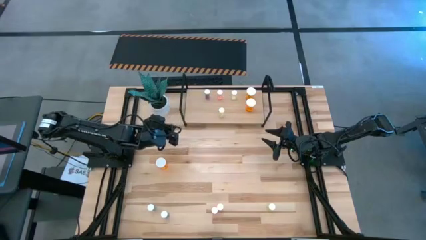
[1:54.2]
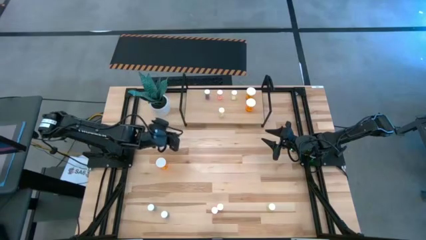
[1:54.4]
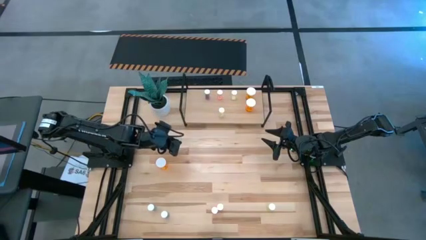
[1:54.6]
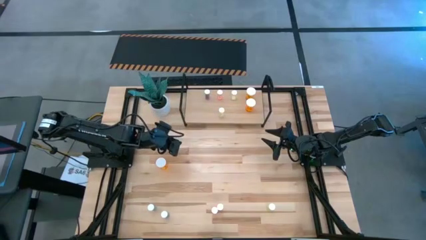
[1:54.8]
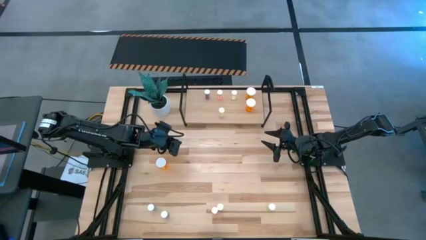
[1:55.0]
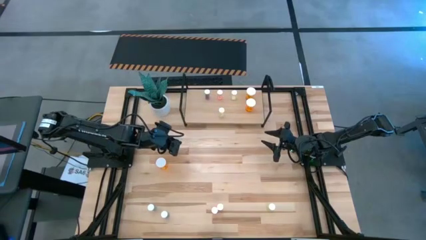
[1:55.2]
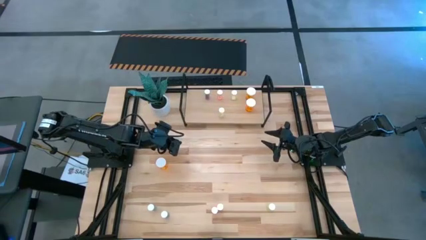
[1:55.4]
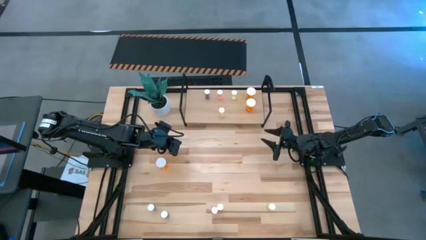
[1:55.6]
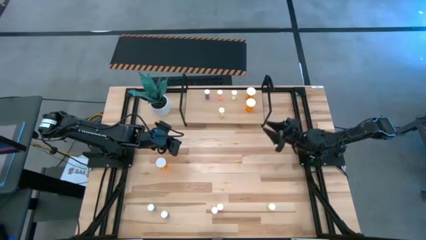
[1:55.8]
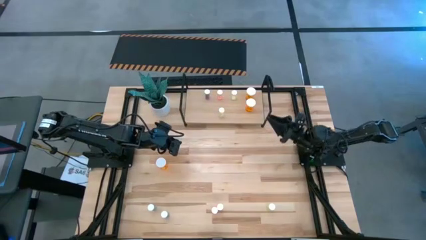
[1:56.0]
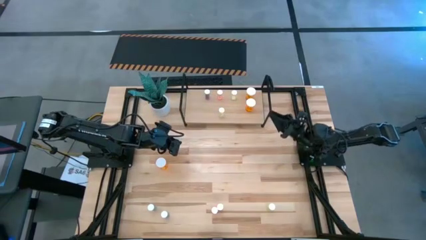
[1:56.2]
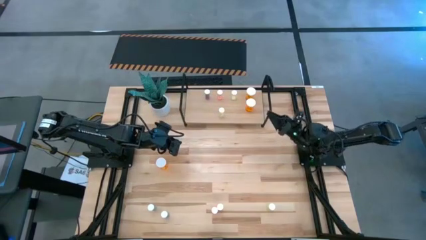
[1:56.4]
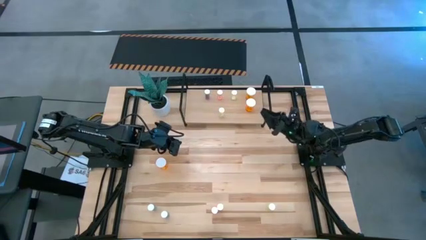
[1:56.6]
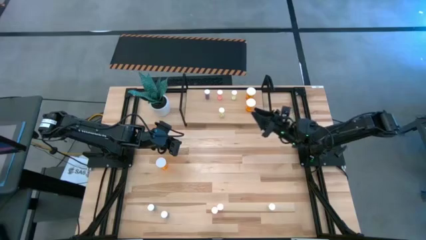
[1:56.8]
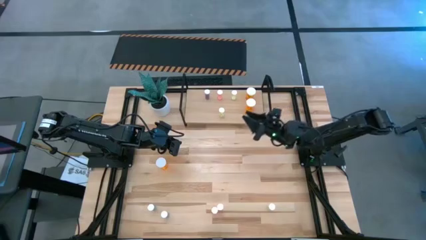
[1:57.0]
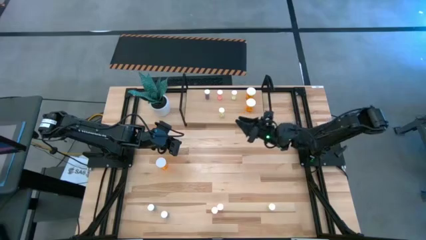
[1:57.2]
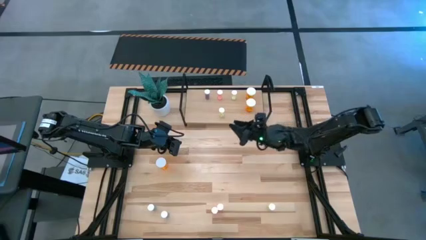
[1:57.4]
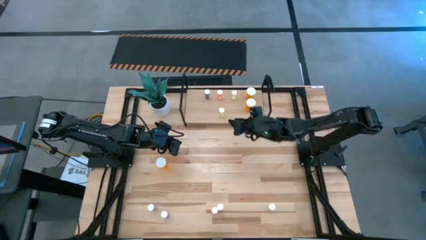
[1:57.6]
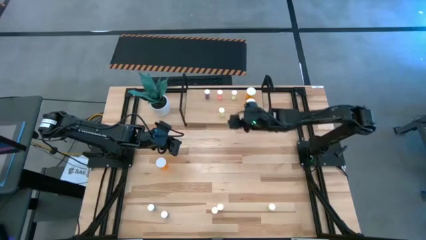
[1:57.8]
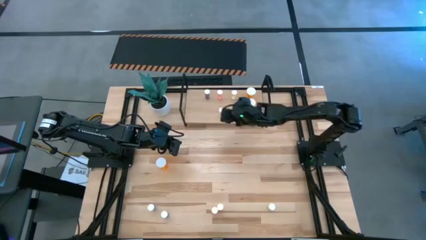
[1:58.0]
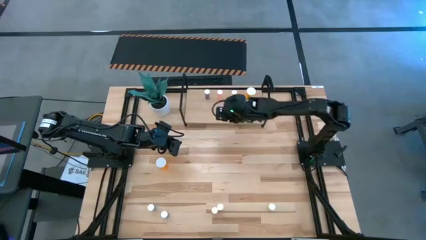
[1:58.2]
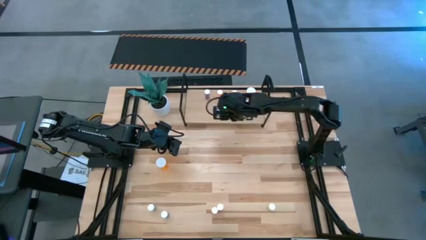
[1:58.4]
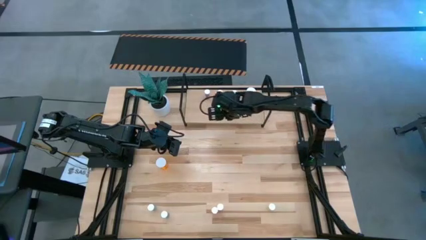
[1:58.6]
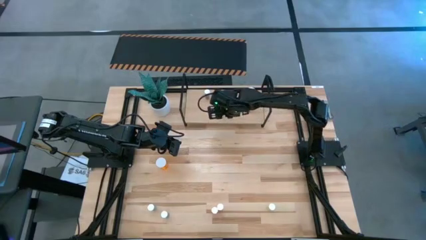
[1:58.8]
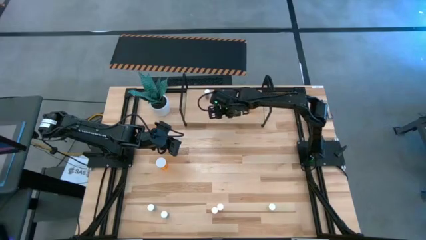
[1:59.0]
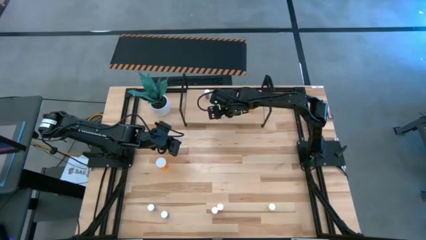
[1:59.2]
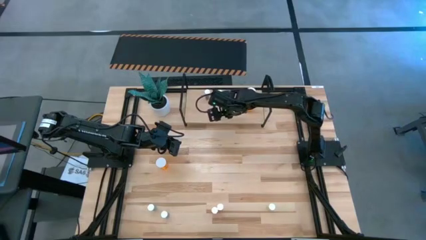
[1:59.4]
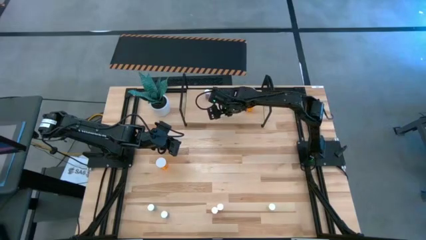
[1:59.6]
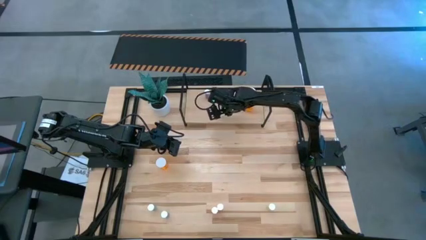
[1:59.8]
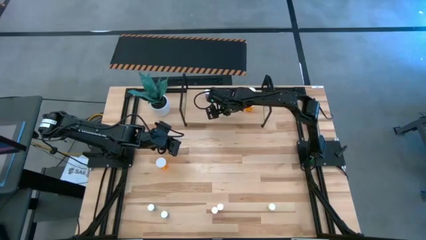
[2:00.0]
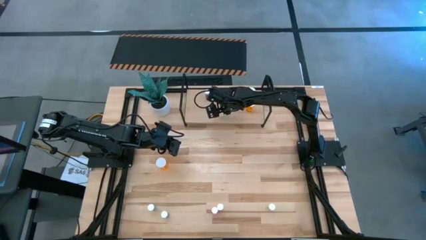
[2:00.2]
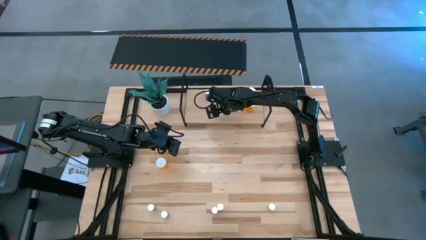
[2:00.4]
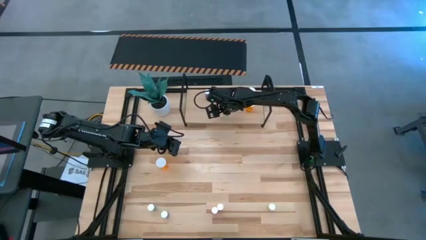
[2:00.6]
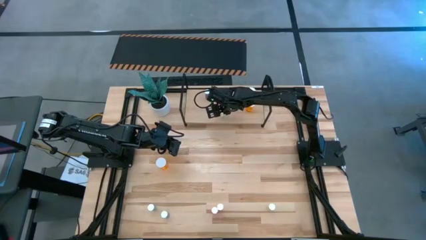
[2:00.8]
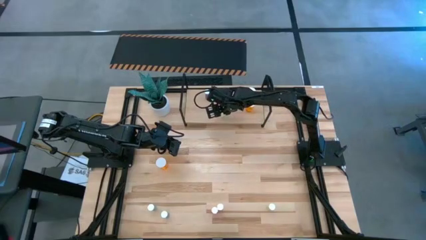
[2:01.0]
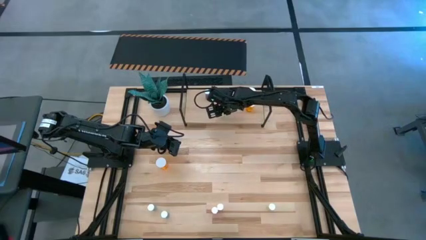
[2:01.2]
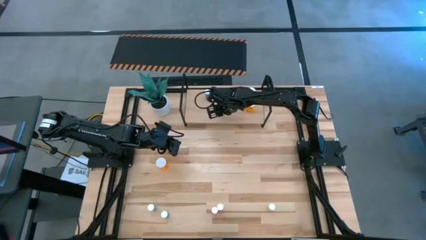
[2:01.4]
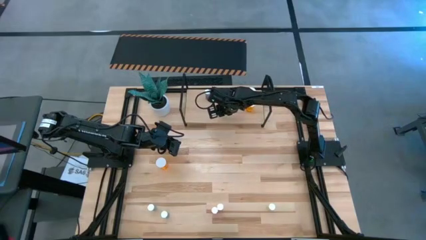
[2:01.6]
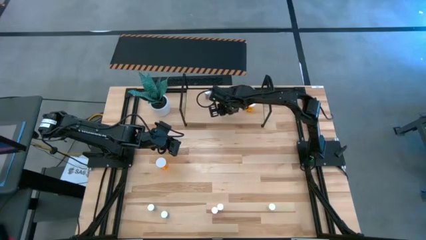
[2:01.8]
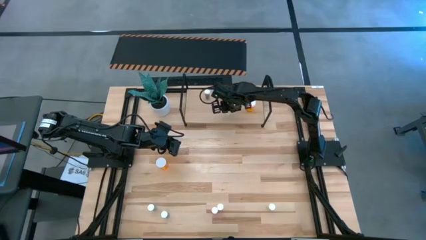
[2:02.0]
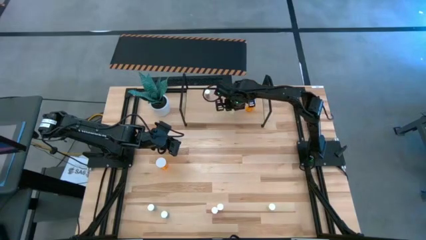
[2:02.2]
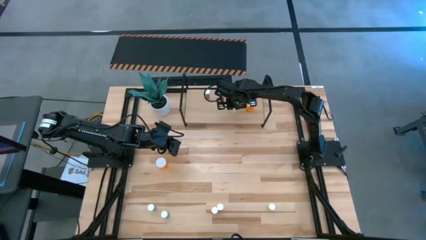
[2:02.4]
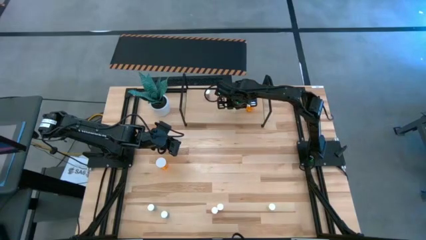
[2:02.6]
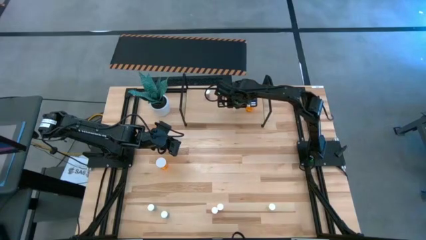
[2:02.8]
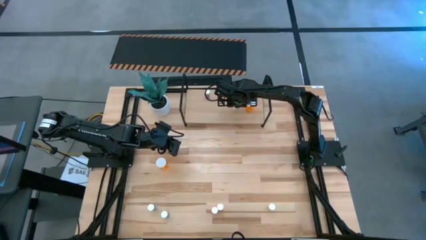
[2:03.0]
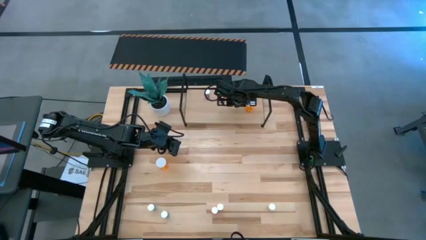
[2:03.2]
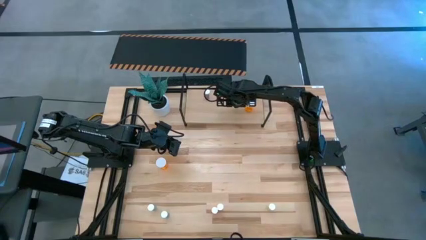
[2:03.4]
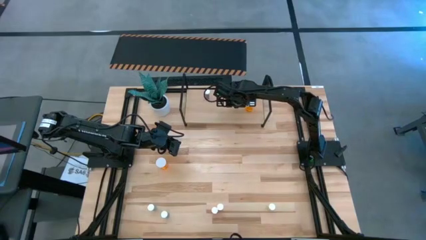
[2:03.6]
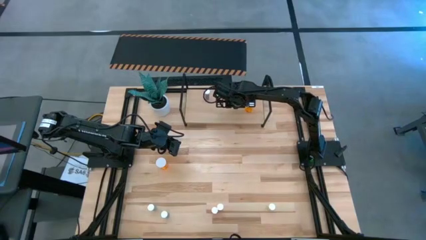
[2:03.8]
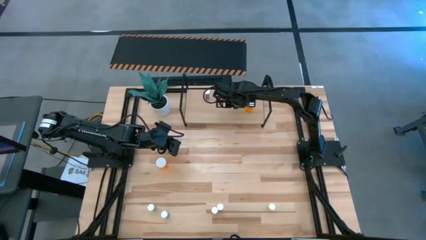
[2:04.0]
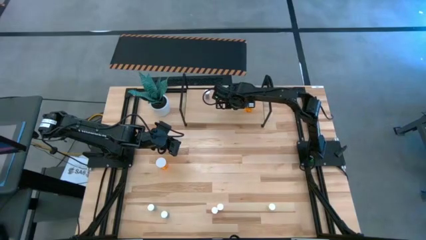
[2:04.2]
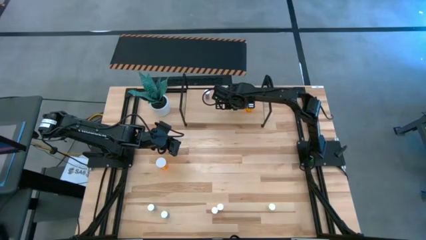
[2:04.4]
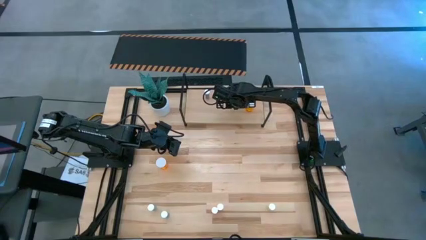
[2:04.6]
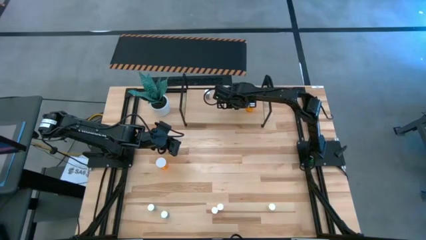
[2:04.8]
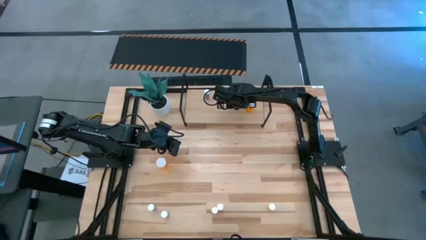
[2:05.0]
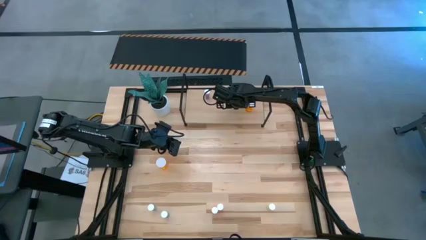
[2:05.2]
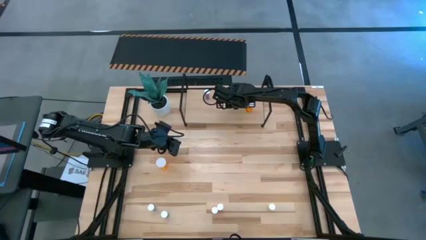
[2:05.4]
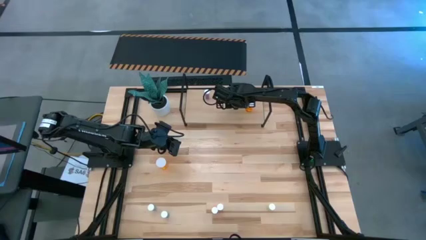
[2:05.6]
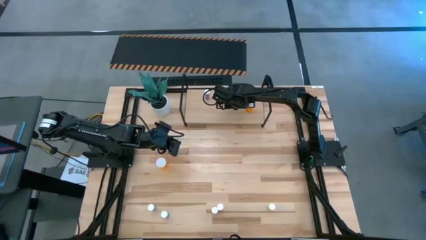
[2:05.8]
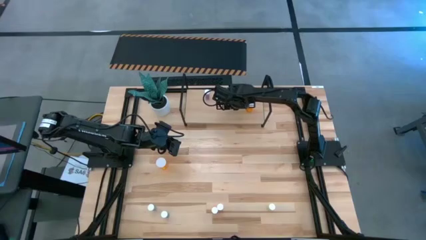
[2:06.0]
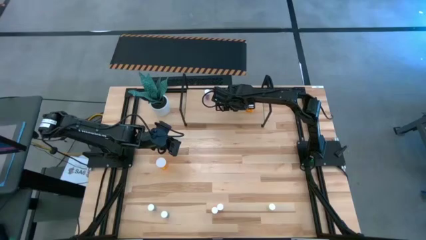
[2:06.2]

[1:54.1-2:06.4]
Task: Pick and place medicine bottles onto shelf by color
Put the yellow pill bottle on the shelf

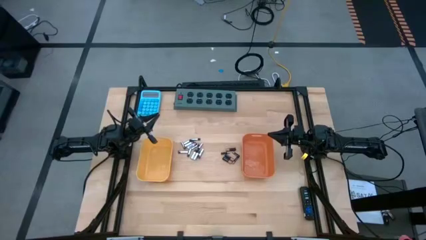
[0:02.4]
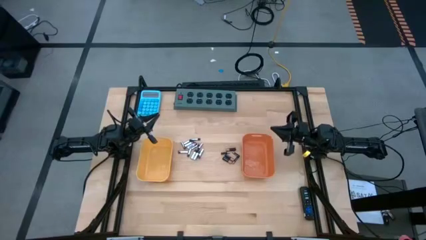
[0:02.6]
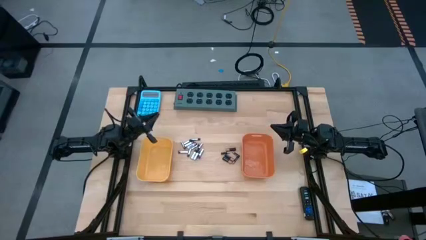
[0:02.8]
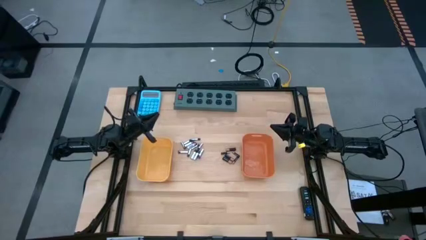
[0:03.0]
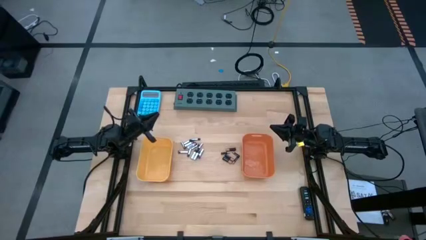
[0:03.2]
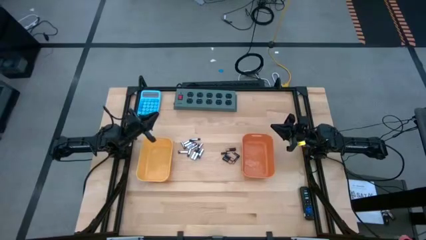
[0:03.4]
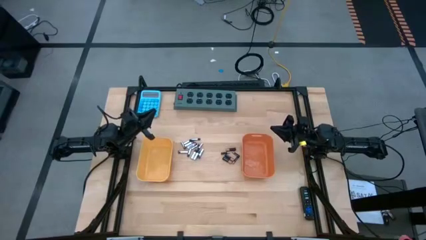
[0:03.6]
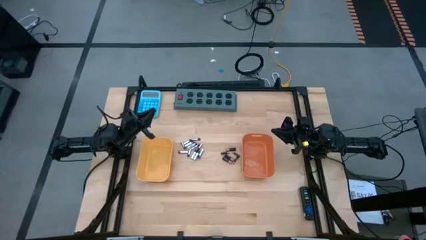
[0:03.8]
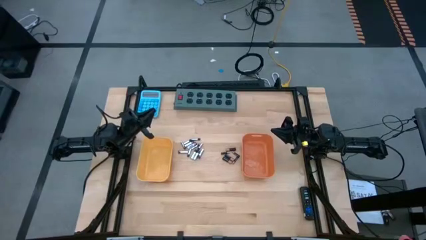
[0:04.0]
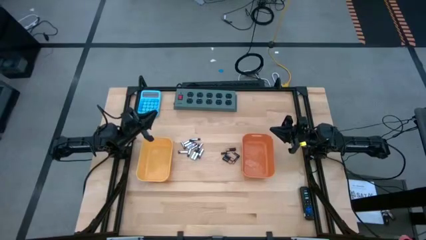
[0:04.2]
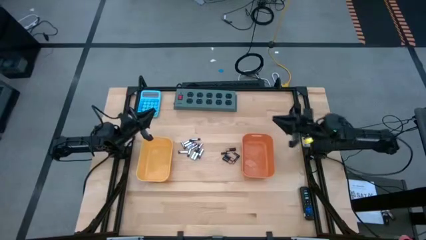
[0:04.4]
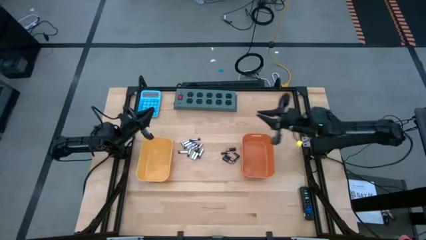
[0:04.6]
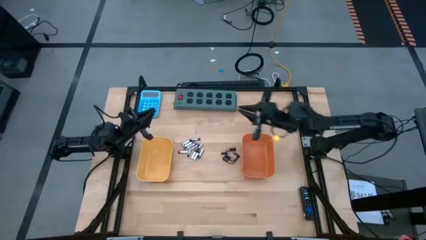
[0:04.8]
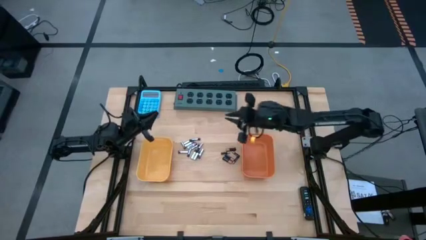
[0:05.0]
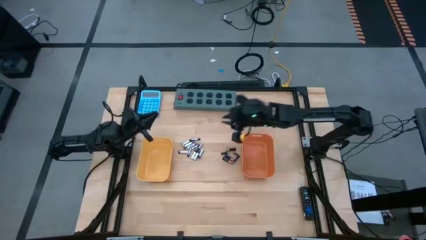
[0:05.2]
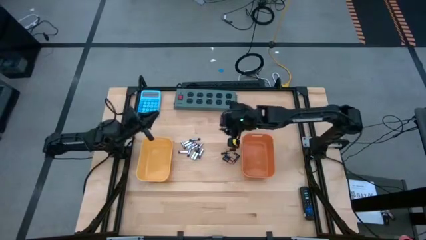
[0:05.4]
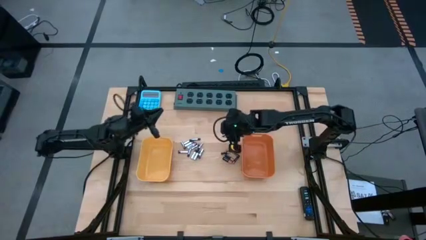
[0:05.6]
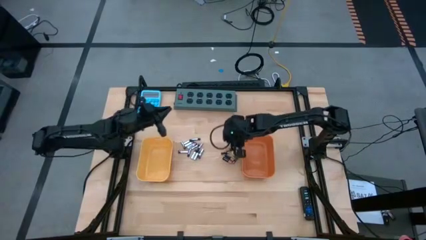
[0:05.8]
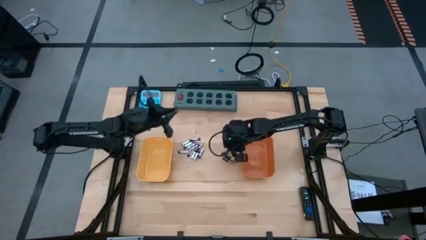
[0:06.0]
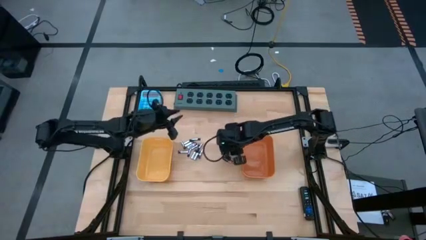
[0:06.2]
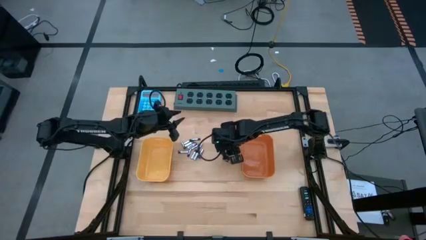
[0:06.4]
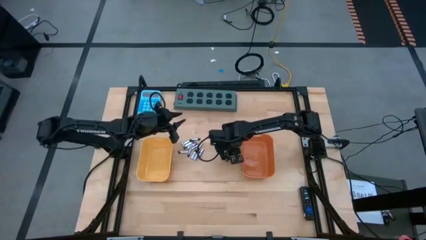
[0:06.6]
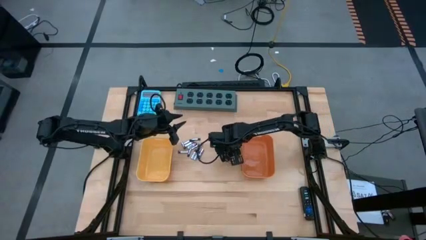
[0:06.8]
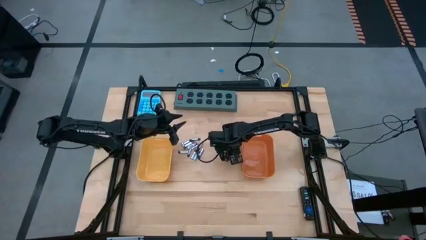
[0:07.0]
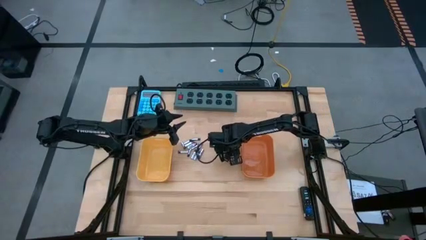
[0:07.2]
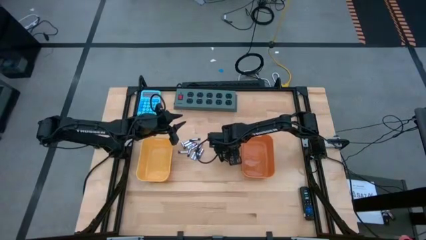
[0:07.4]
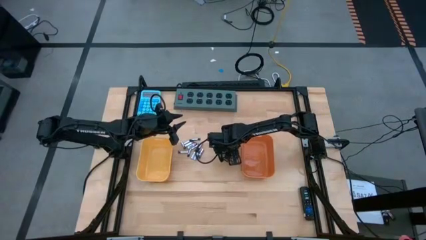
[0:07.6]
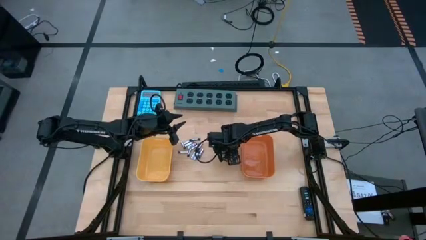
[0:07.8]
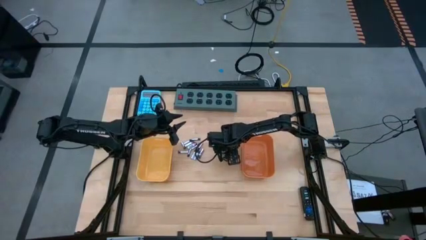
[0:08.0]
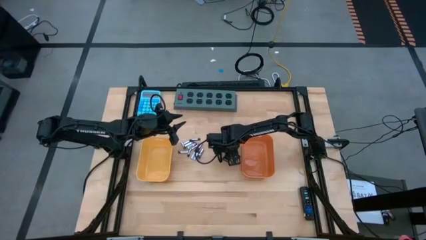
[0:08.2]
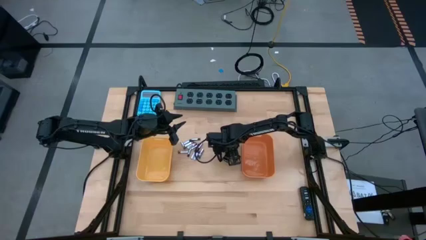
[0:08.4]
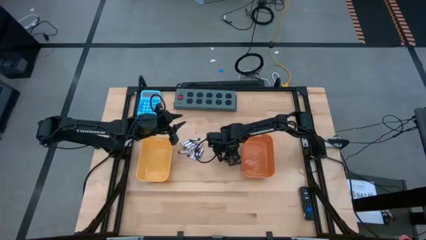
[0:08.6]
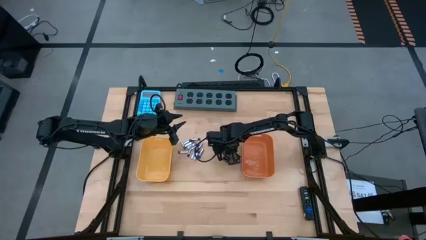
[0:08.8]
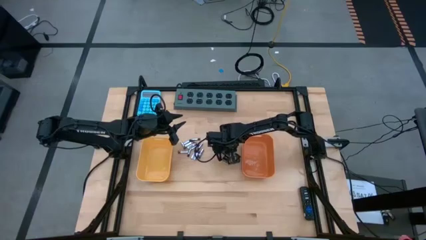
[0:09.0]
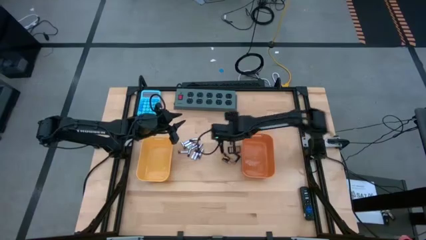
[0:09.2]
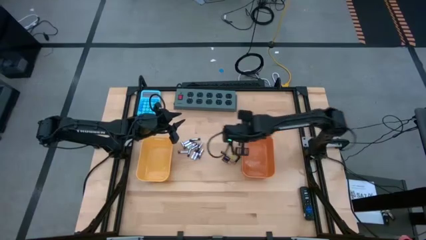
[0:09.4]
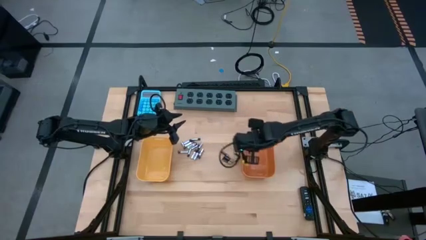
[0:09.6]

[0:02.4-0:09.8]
Task: Sort batteries
Put the black battery into the orange bin
